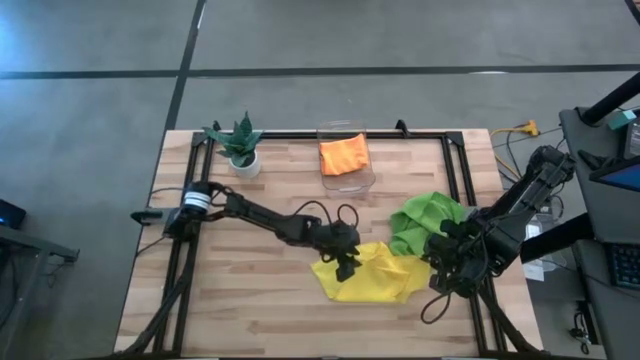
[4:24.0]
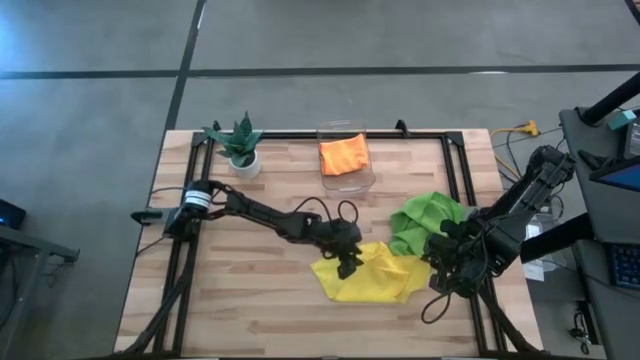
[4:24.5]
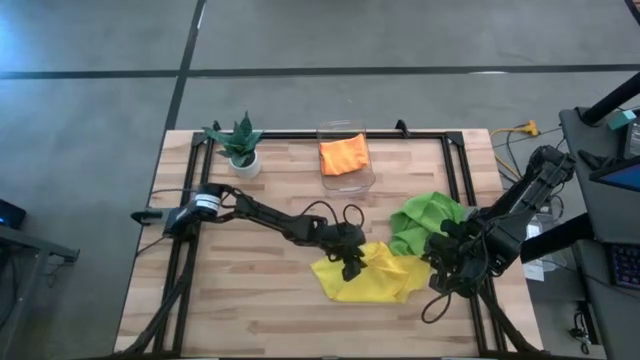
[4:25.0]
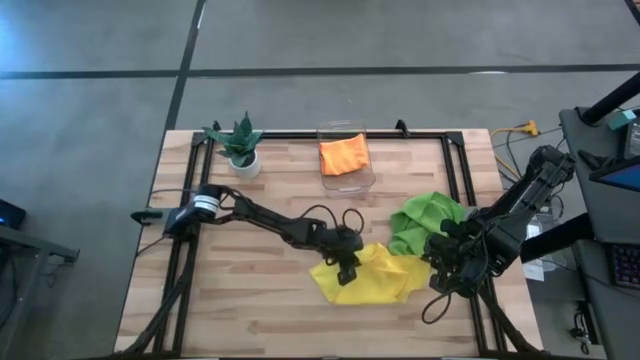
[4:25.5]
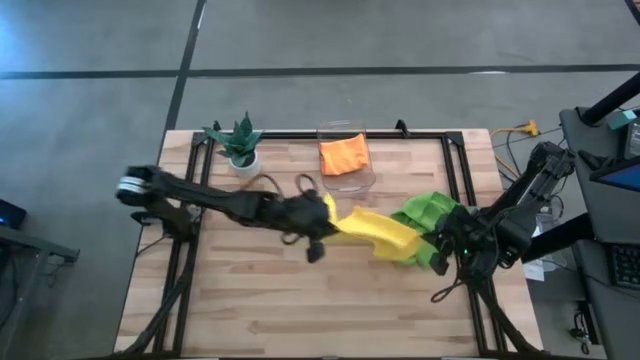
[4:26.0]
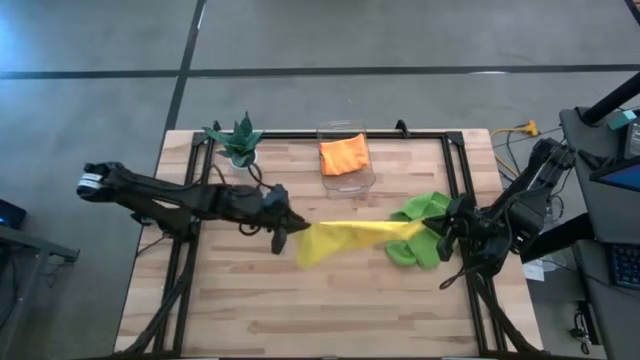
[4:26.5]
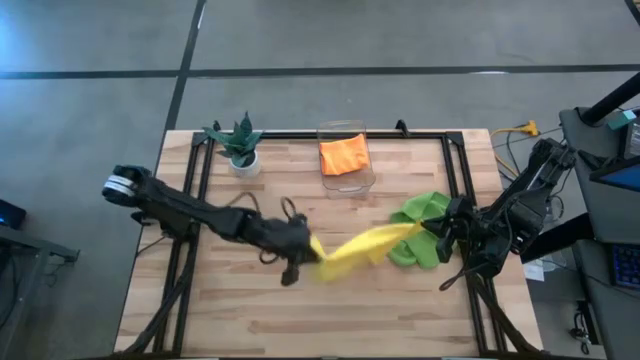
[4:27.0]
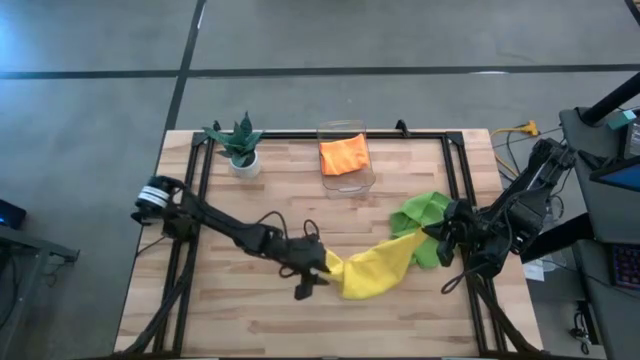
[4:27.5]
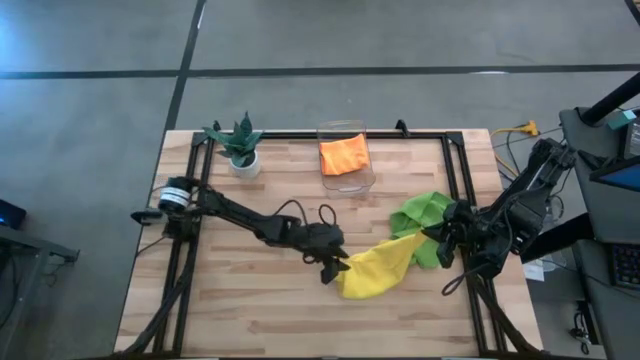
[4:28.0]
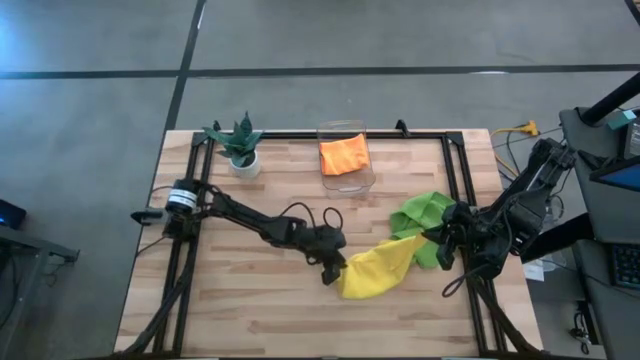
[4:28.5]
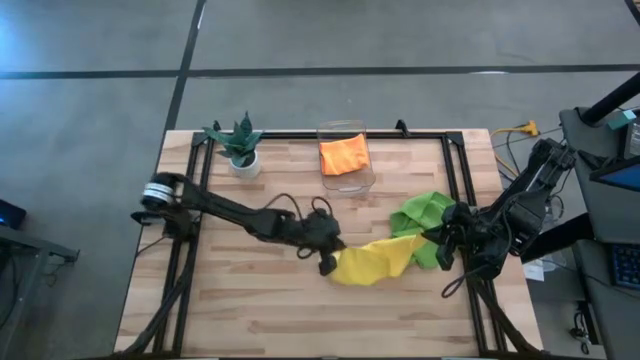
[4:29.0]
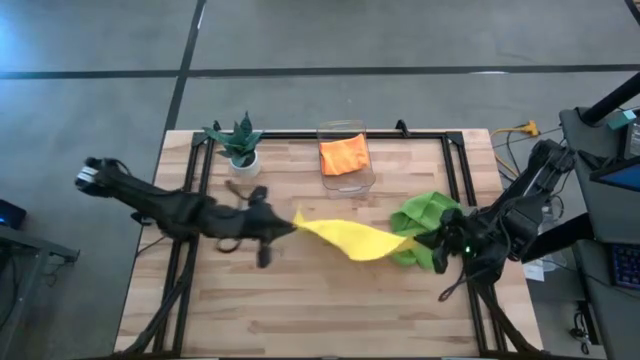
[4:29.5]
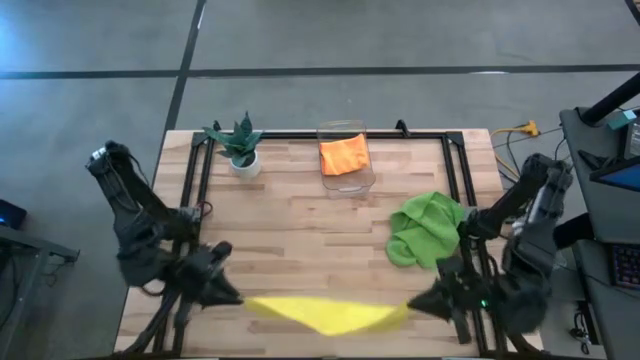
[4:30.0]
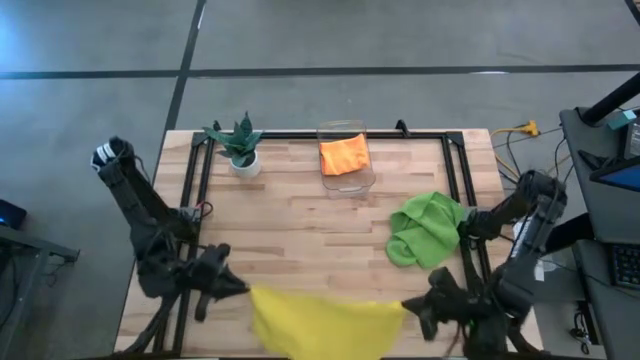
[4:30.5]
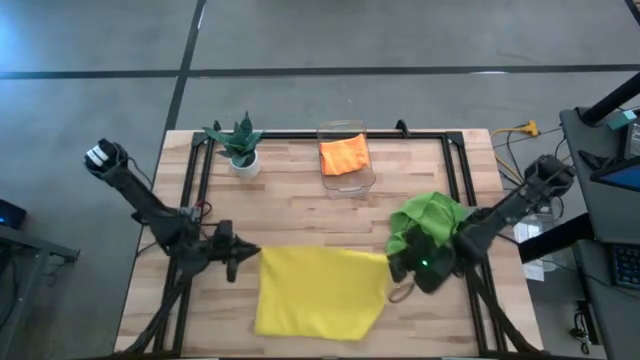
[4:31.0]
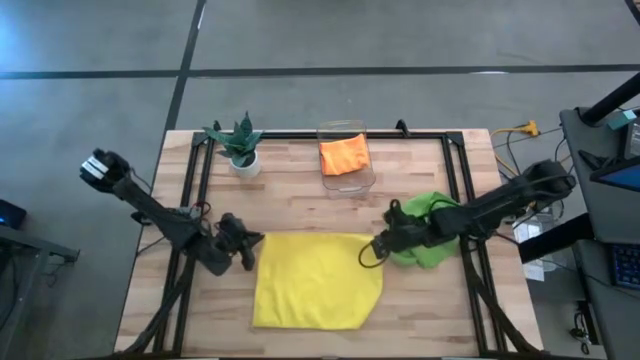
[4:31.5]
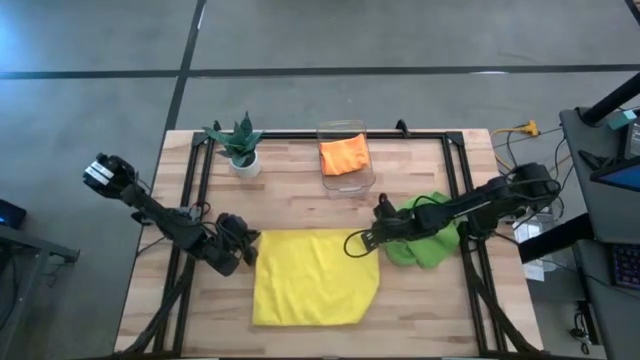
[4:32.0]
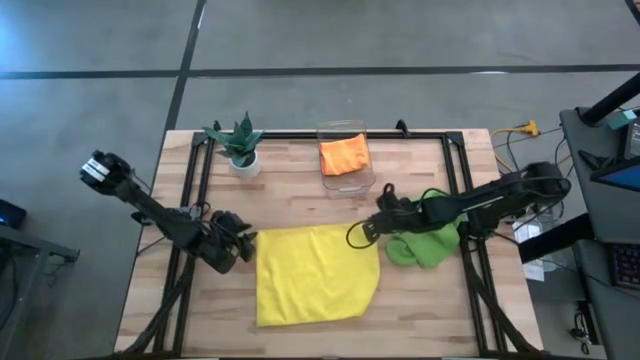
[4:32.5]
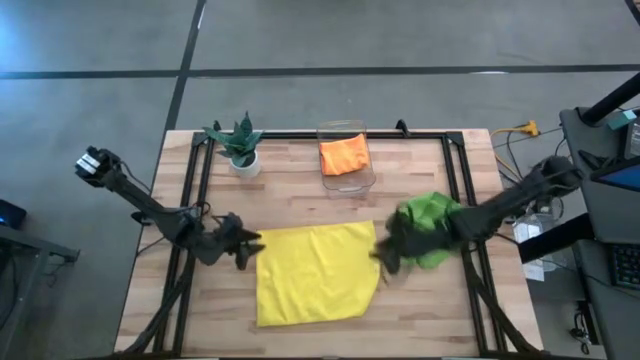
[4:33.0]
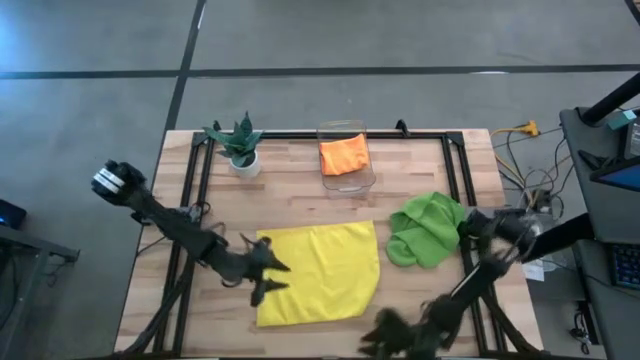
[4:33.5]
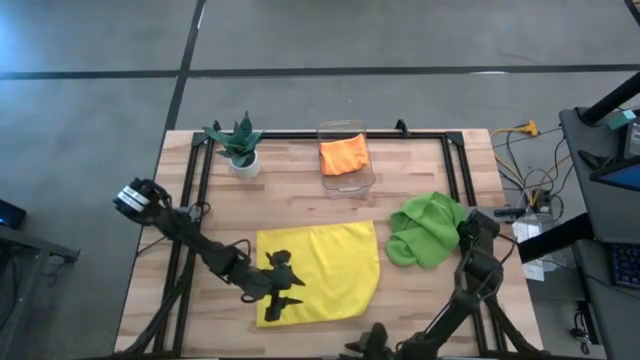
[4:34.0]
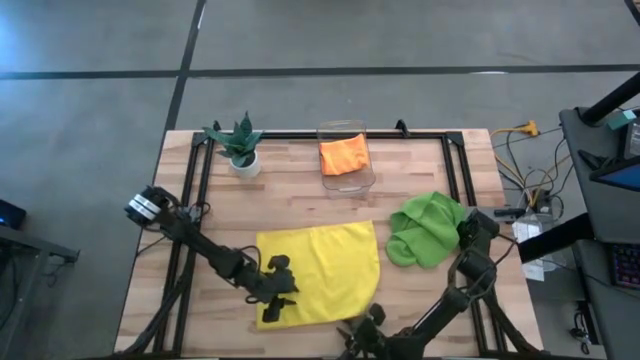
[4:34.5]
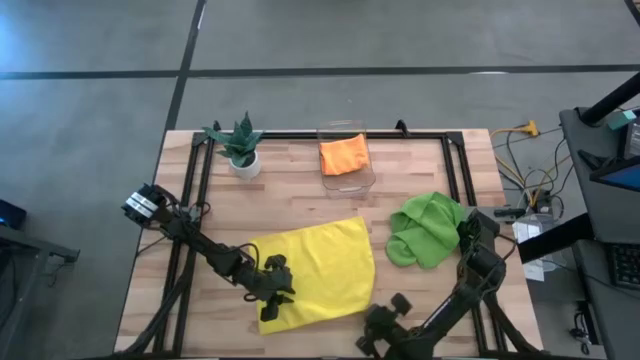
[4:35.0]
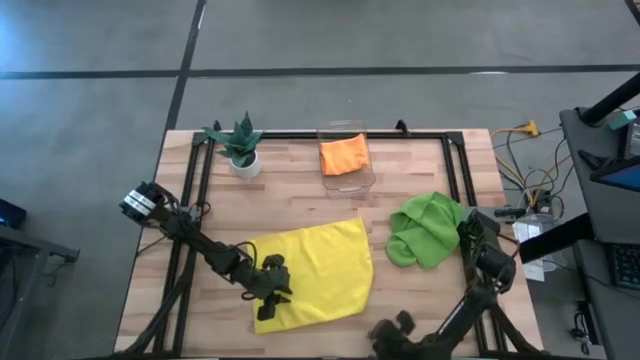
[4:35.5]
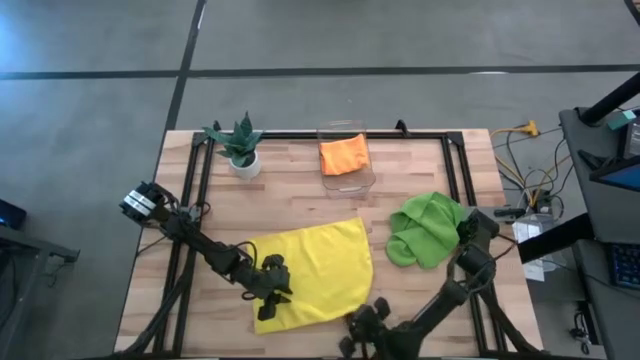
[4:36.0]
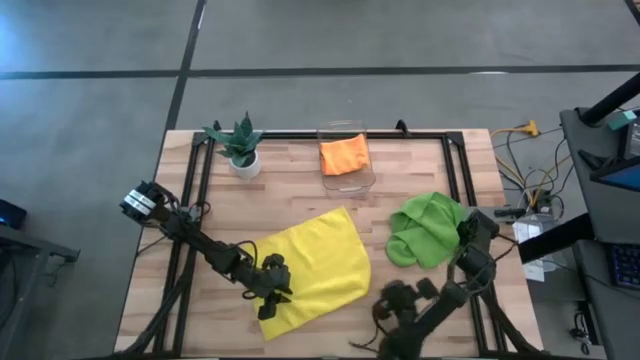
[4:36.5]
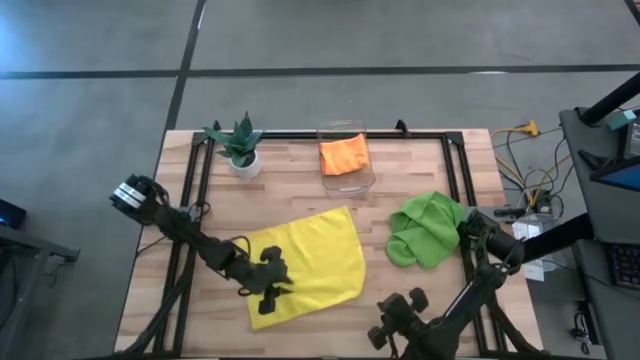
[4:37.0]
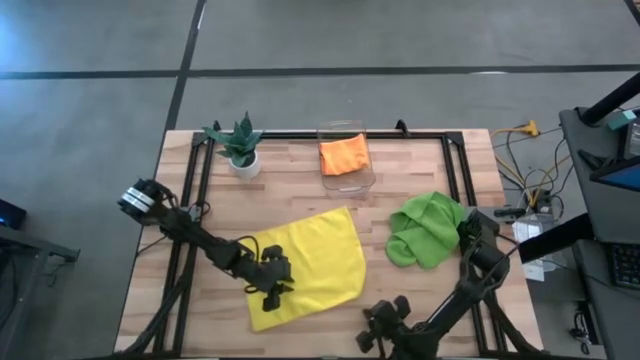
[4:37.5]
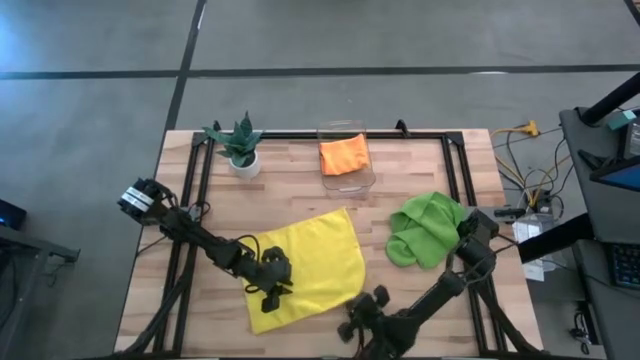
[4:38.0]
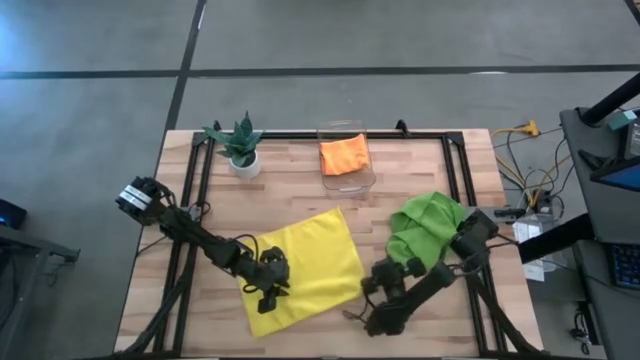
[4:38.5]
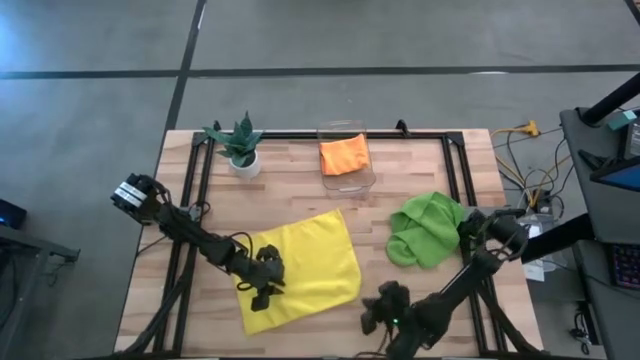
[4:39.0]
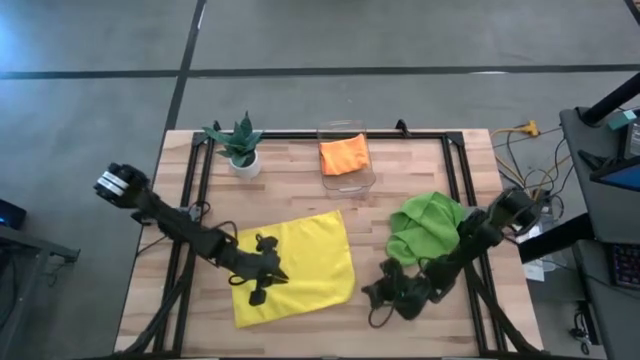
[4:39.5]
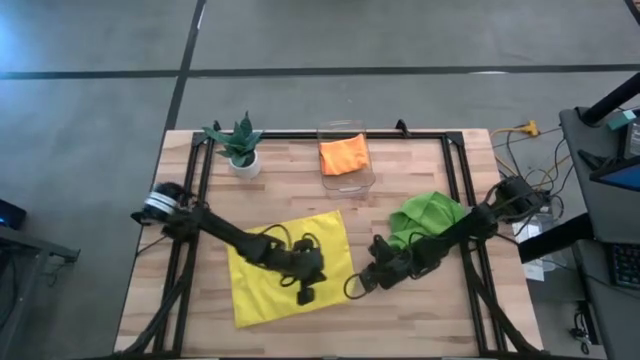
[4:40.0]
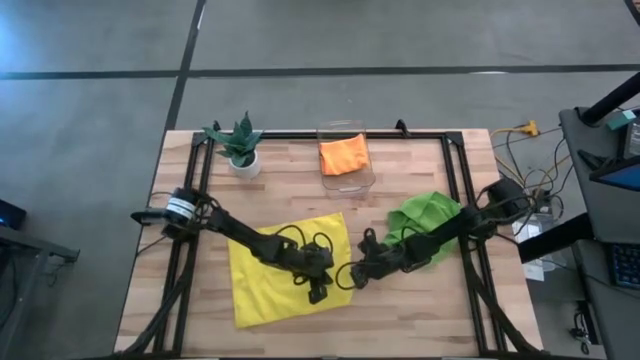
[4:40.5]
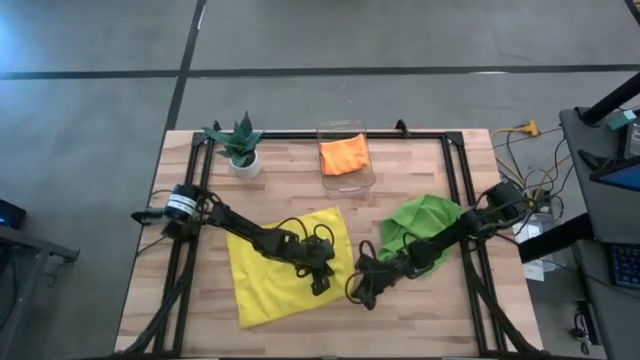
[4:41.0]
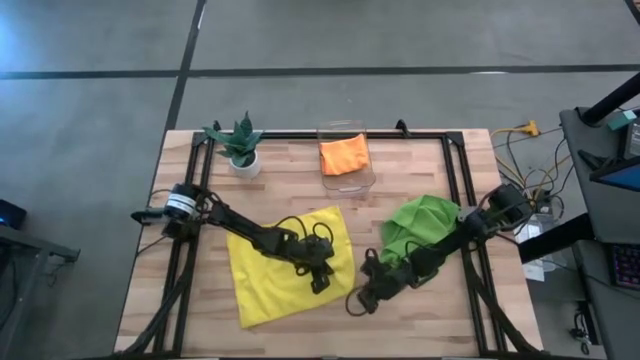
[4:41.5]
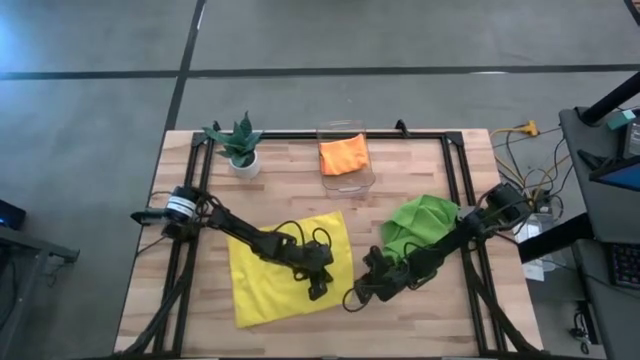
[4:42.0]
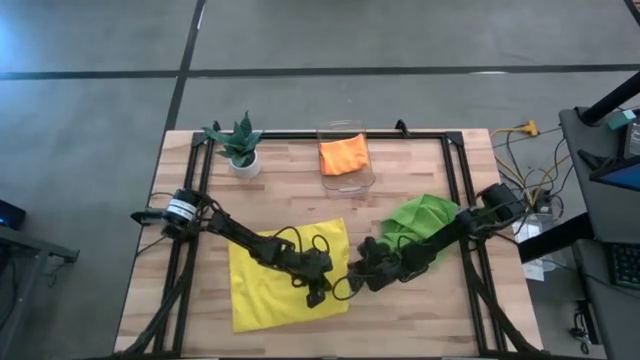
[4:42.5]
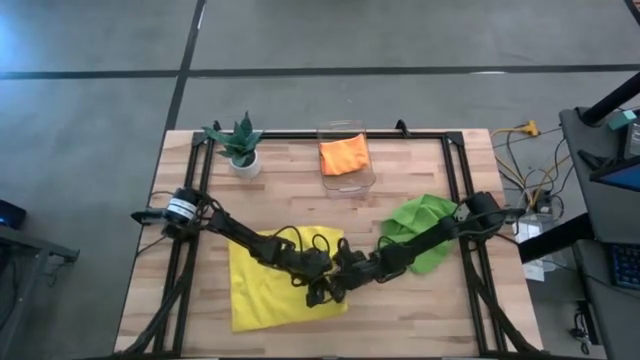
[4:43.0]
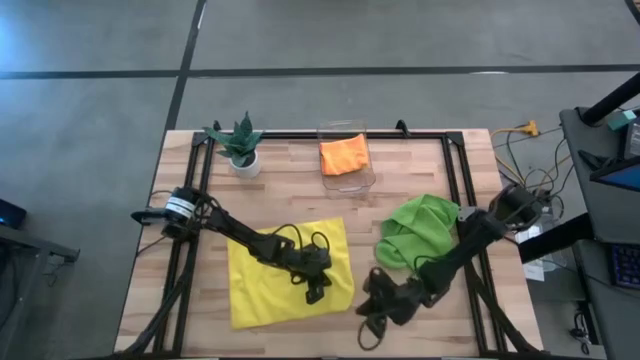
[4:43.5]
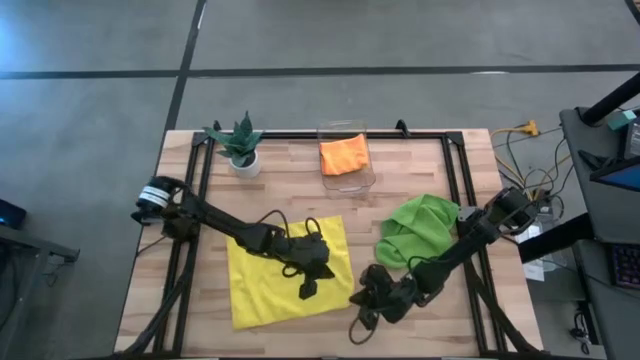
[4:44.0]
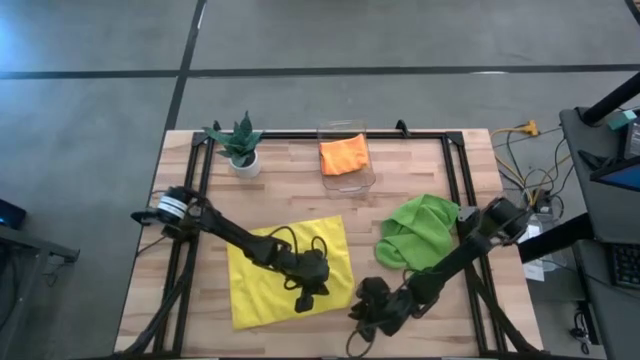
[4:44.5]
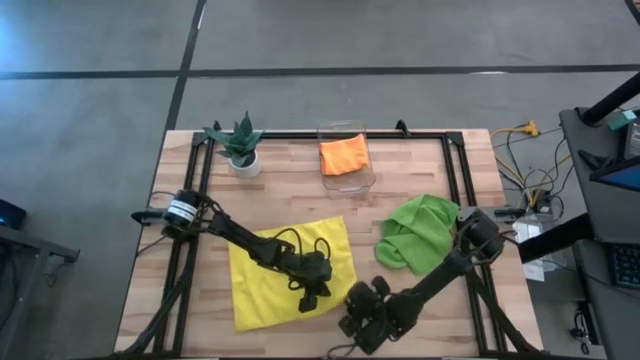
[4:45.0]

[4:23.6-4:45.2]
Task: Fold microfiber towels
Fold the yellow towel
